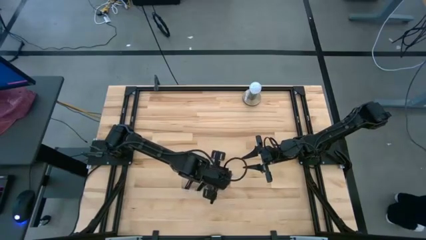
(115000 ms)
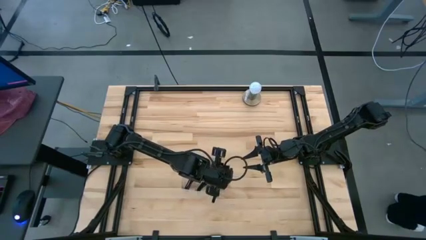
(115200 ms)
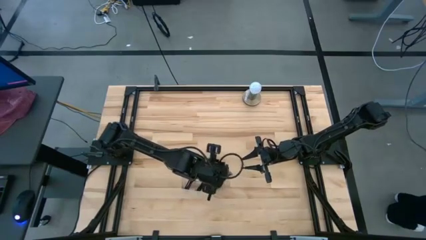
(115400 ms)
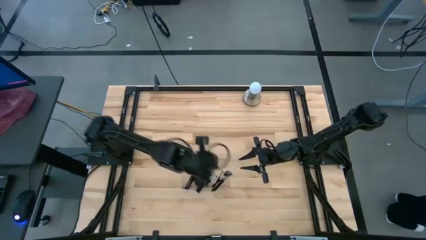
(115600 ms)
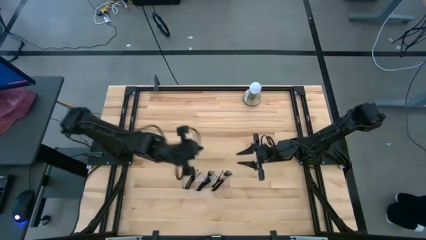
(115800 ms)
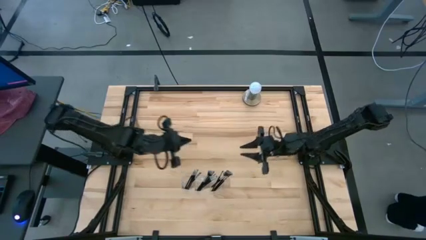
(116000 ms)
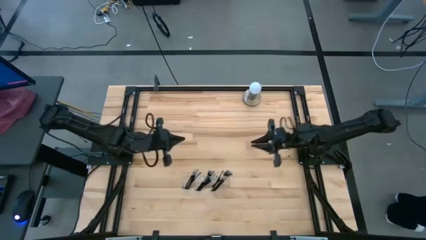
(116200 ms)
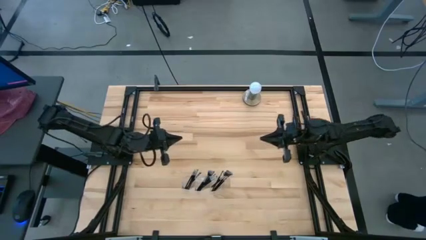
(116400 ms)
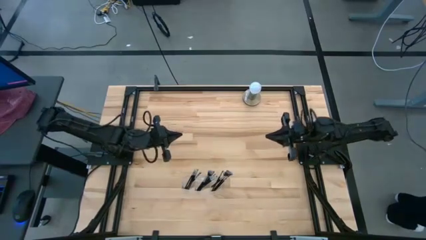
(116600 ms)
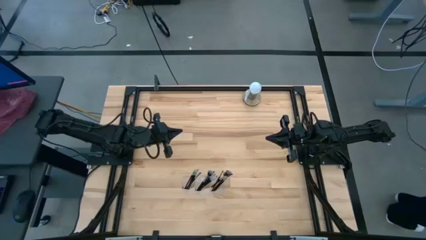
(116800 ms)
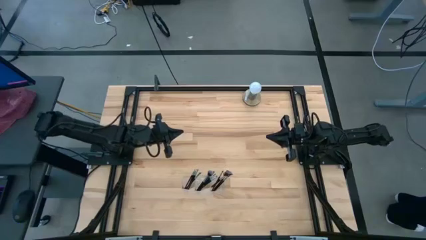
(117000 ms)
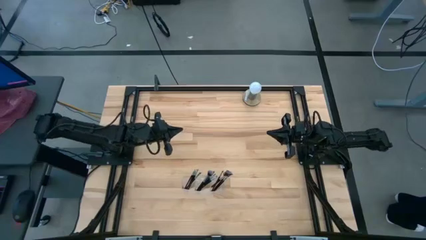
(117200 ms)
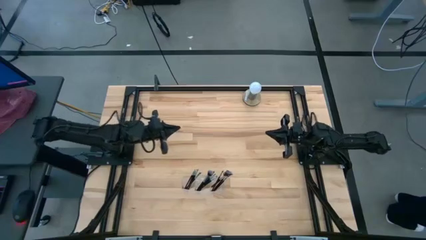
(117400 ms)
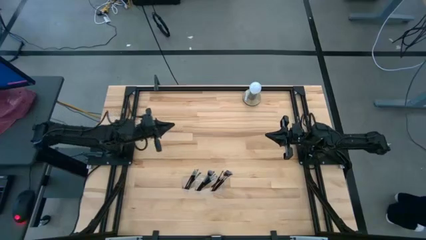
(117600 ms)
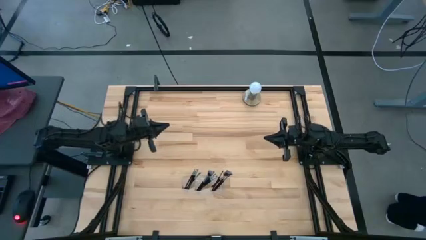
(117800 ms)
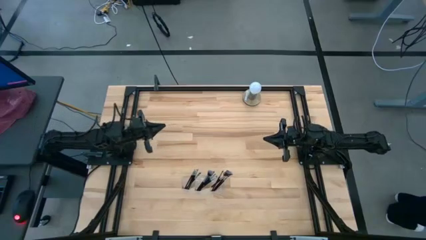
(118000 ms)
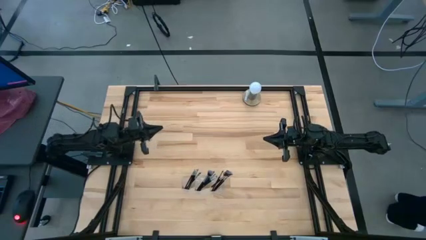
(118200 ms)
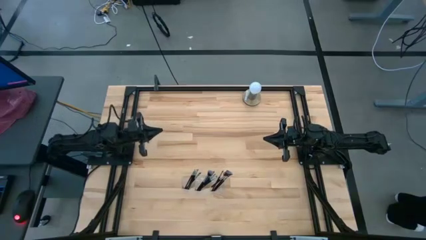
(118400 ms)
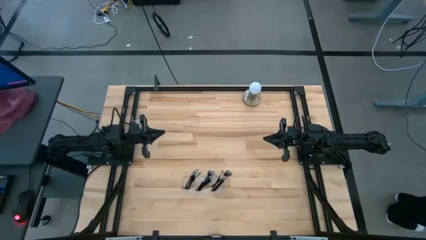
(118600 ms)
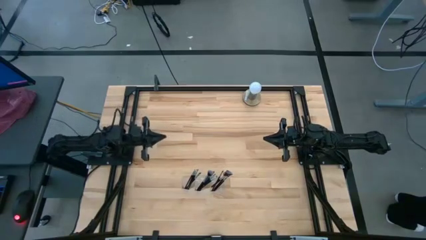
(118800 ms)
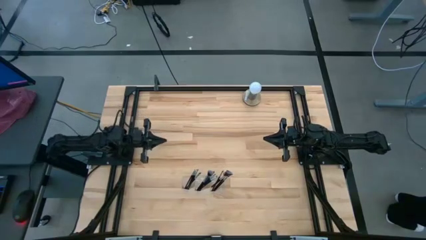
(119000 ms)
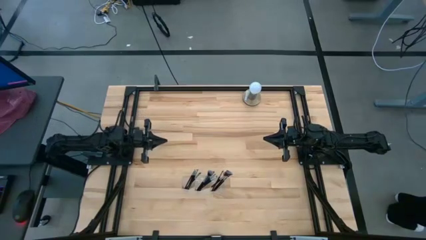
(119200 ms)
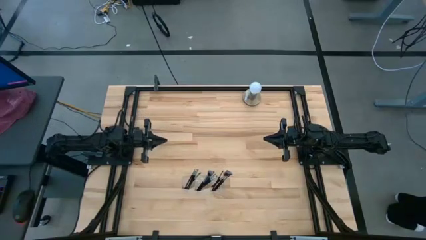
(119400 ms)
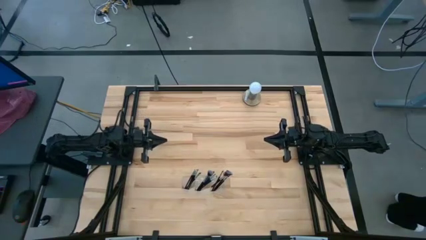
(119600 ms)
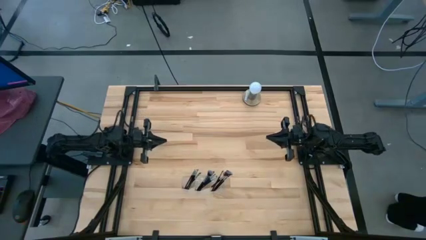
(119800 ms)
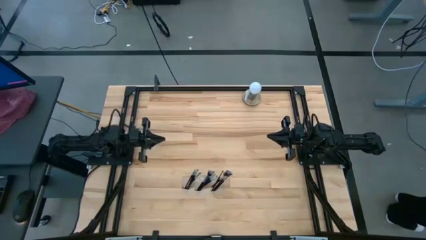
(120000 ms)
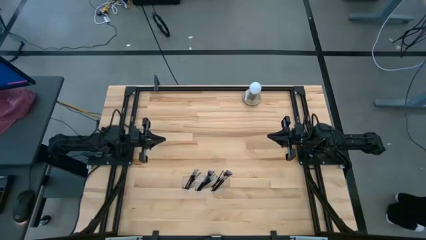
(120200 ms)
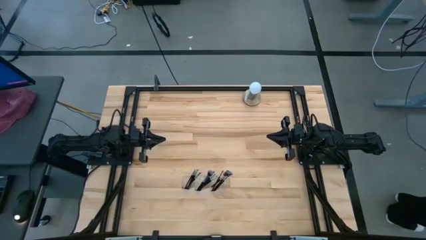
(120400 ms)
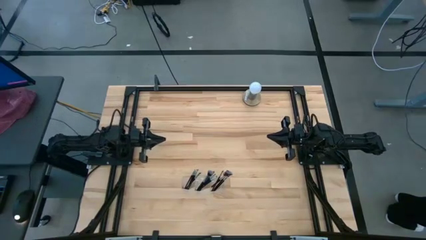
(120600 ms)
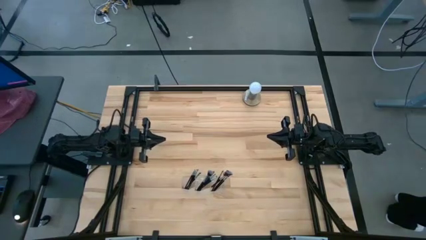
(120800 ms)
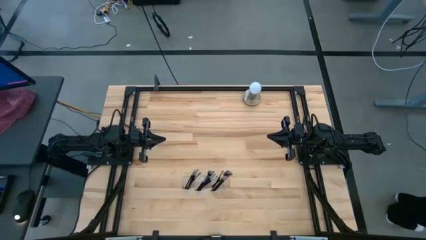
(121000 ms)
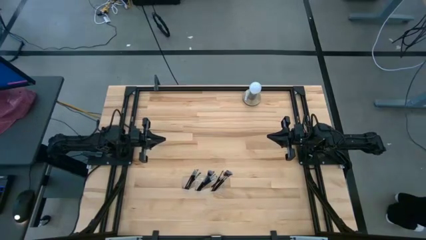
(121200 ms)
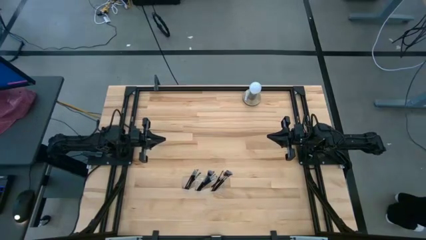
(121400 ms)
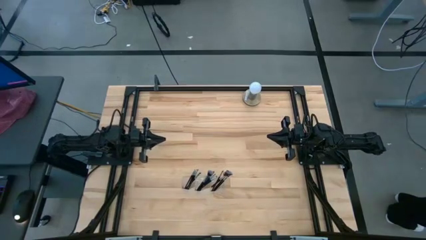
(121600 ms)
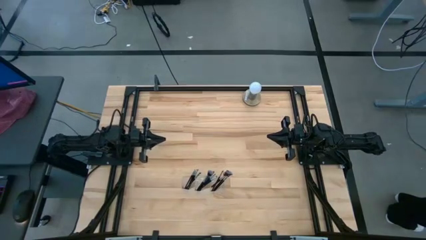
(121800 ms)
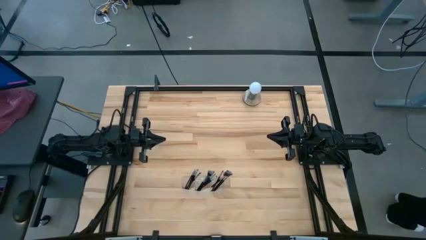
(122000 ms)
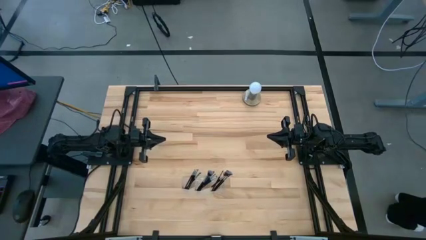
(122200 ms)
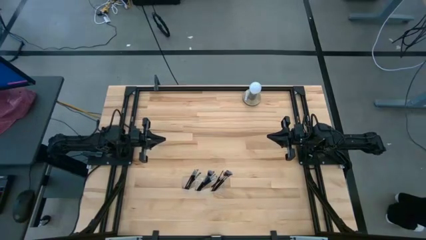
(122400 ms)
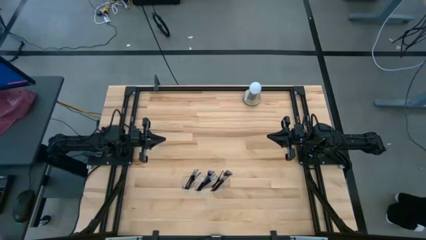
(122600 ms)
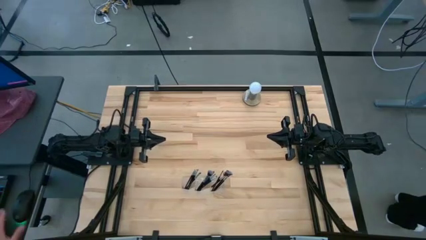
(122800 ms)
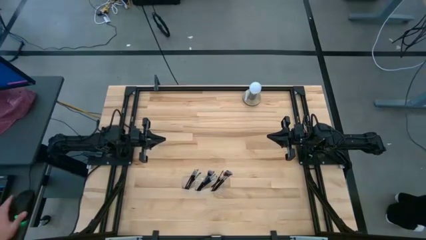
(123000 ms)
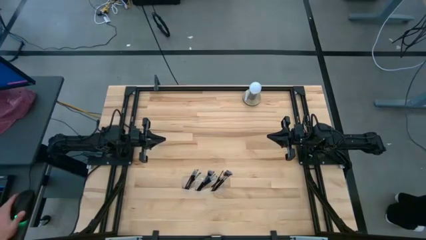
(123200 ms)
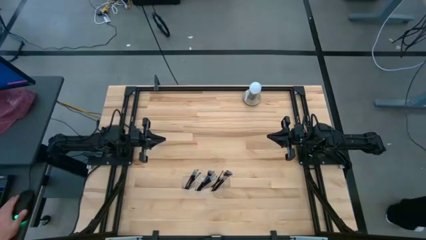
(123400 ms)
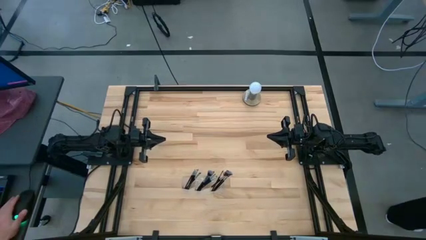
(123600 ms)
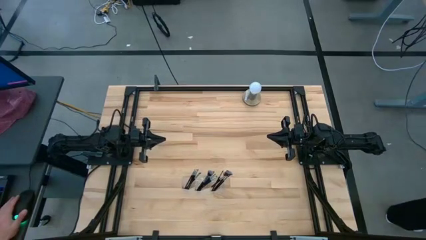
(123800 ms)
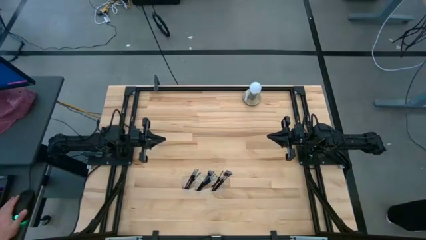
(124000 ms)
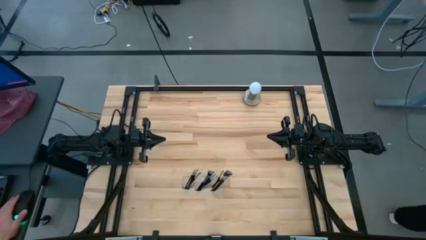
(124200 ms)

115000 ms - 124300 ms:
Task: Put items in baskets/containers
Return to Home Position

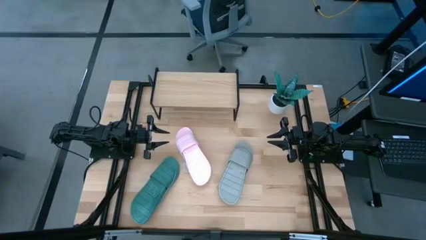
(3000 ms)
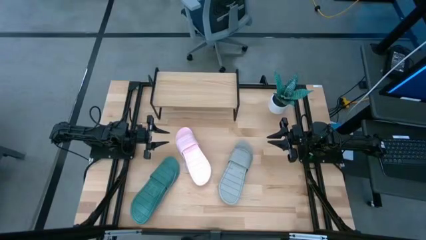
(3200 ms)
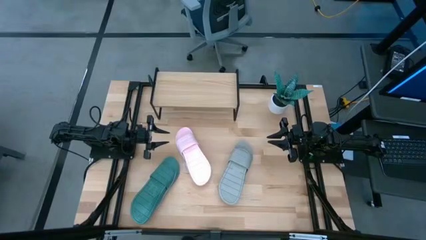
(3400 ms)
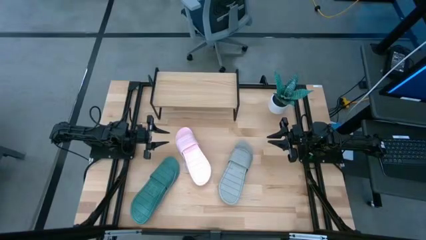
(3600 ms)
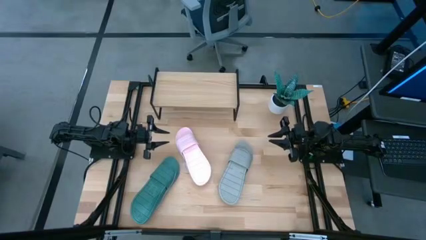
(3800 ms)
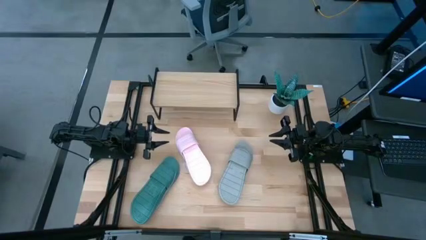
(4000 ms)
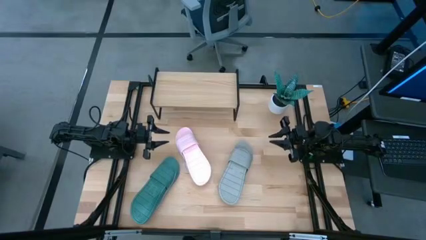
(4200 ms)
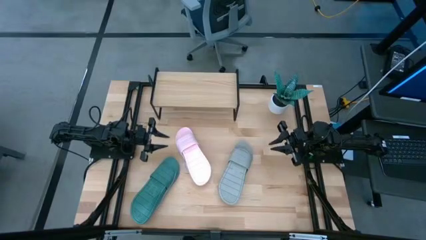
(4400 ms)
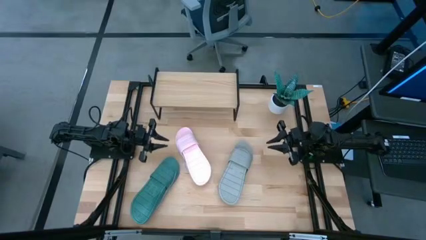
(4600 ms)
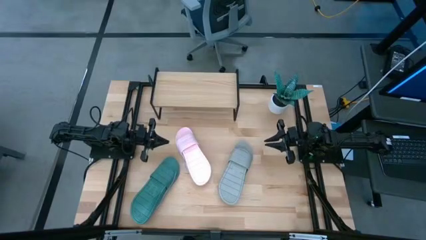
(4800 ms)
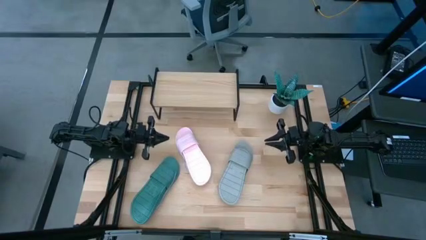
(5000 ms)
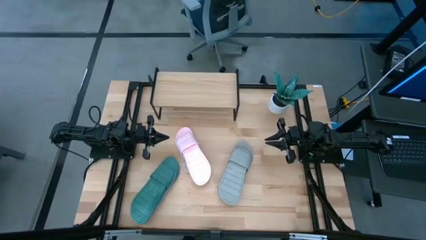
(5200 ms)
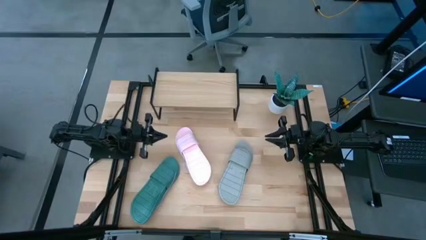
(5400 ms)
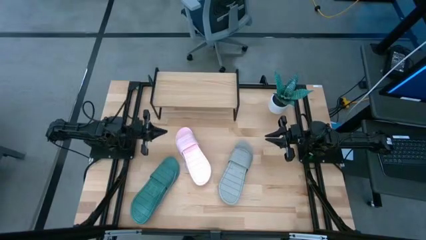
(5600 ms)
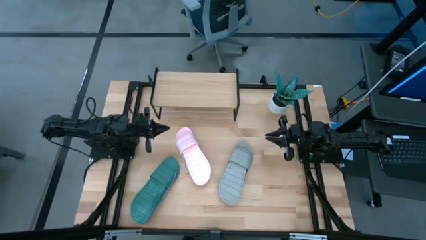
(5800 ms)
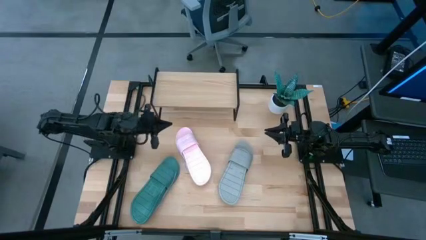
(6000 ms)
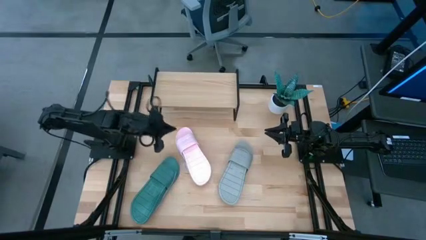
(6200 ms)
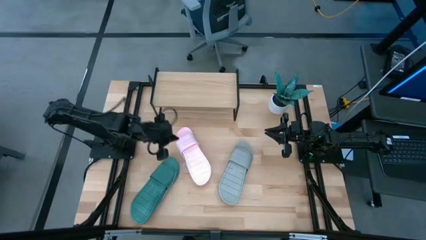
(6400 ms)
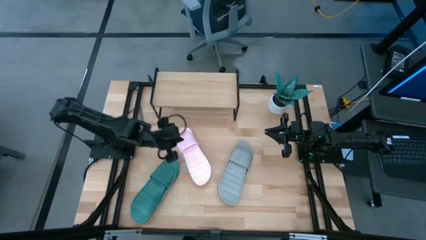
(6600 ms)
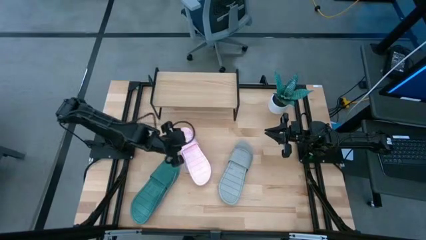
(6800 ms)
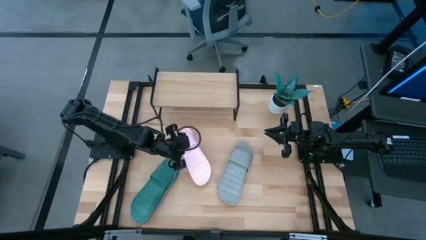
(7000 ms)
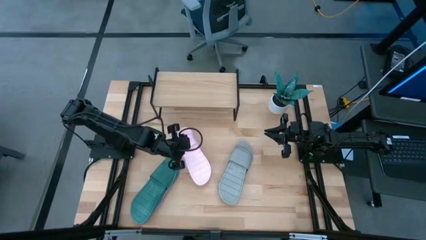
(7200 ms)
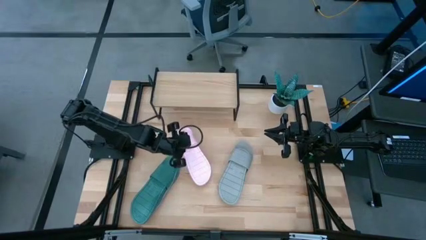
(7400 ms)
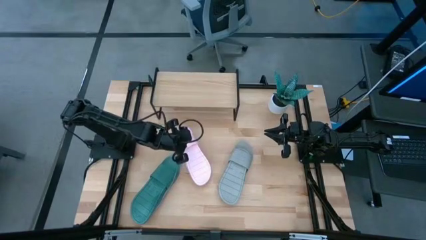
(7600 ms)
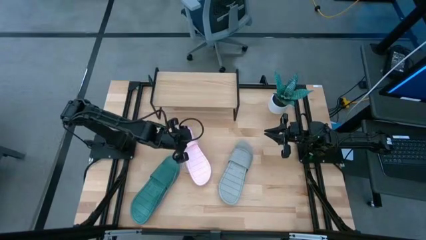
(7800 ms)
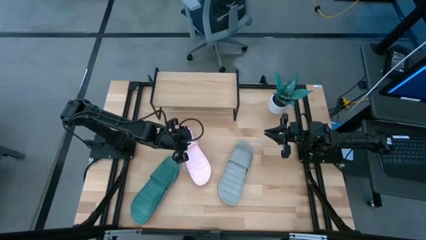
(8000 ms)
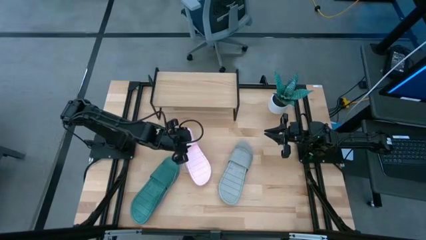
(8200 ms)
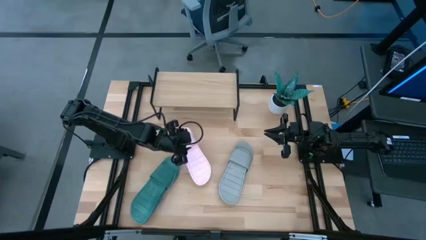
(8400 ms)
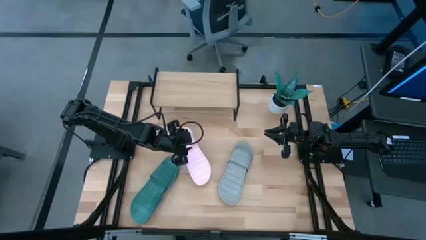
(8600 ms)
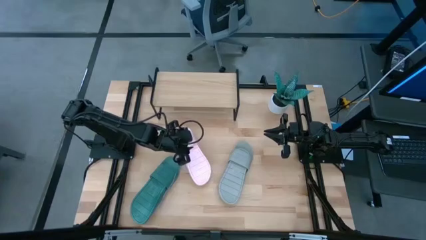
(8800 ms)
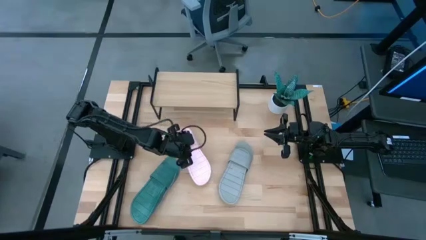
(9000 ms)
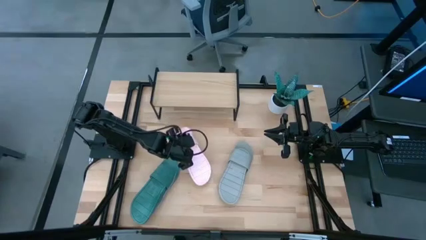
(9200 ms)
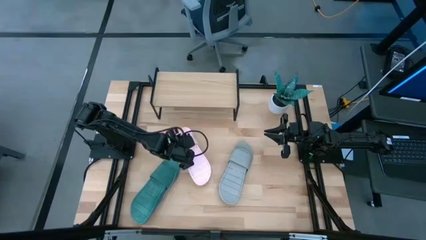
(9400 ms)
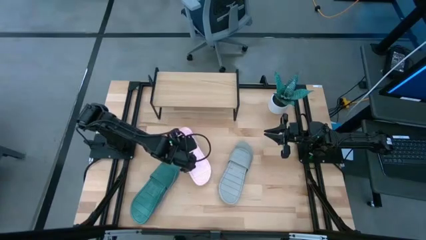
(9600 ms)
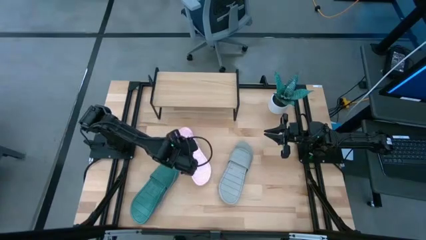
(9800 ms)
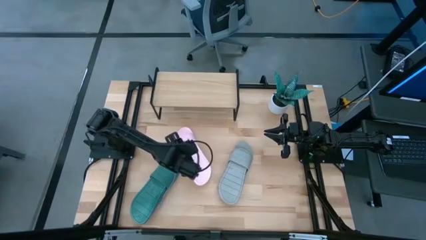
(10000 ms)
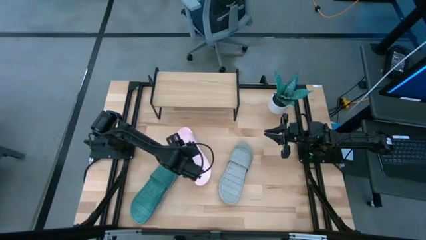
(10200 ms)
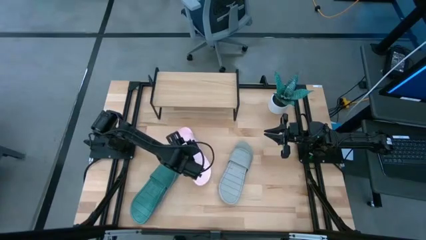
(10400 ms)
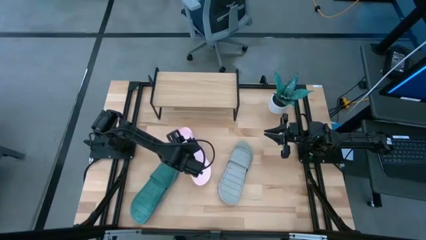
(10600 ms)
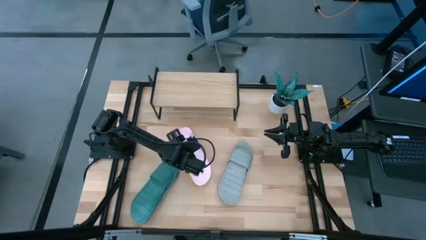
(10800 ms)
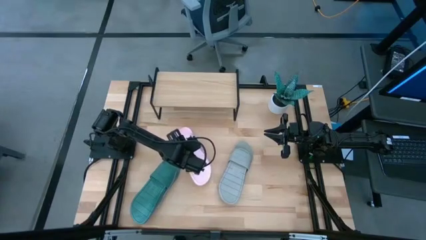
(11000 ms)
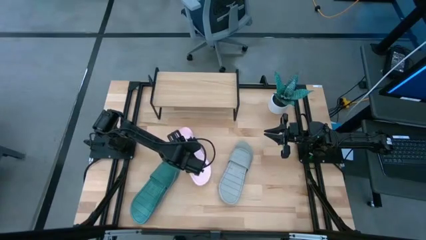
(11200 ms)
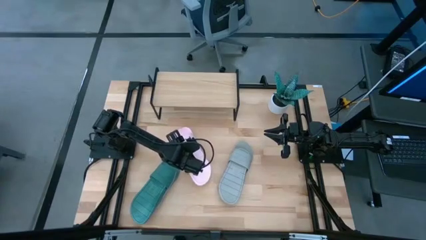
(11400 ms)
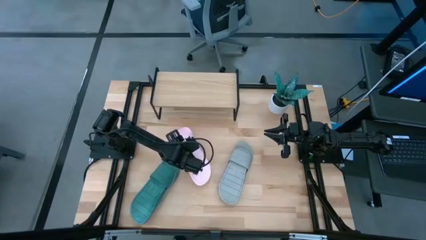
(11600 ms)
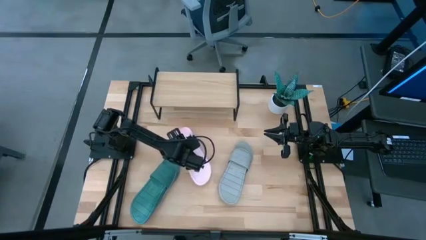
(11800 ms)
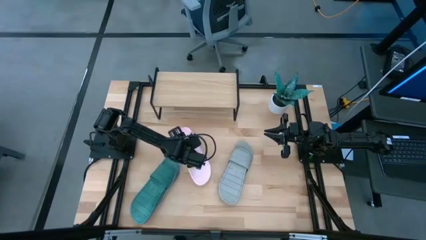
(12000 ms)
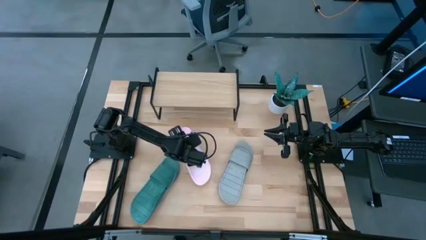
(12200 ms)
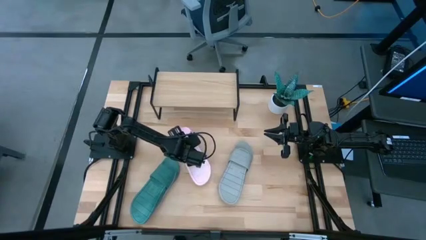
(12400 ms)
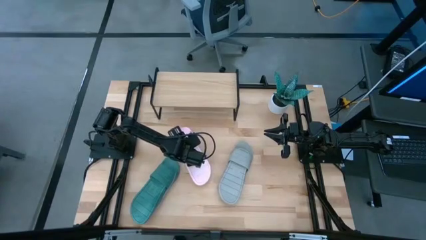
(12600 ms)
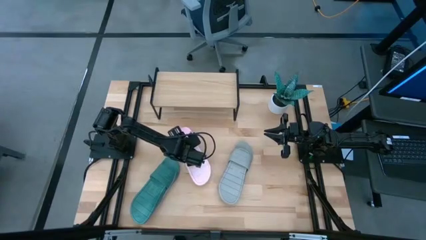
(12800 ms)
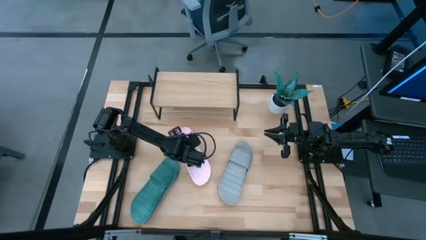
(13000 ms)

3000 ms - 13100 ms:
Task: Pick and place slides into the shelf
Put the pink pair of slides on the shelf
